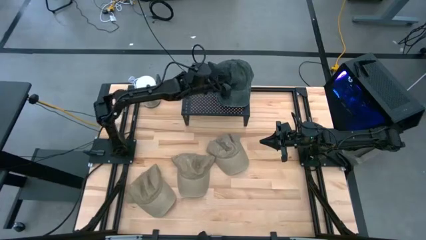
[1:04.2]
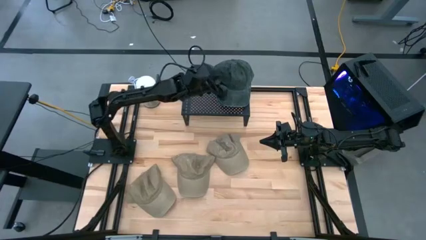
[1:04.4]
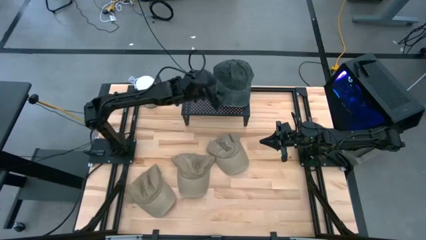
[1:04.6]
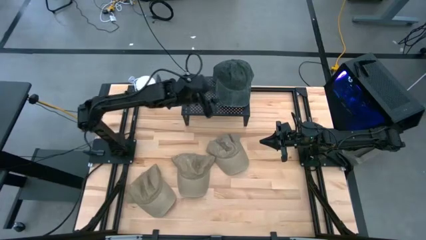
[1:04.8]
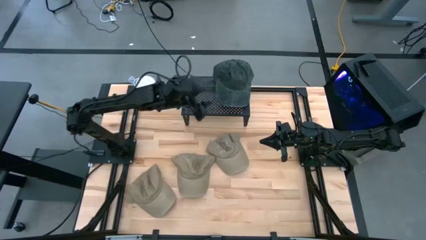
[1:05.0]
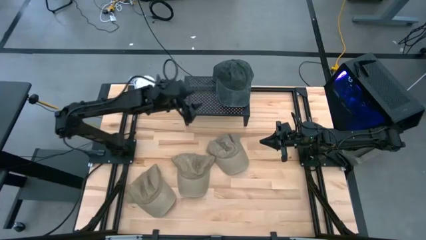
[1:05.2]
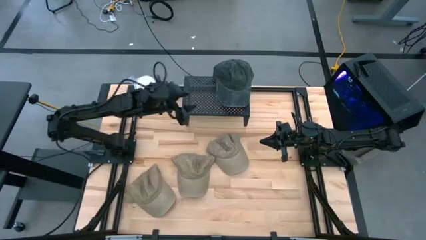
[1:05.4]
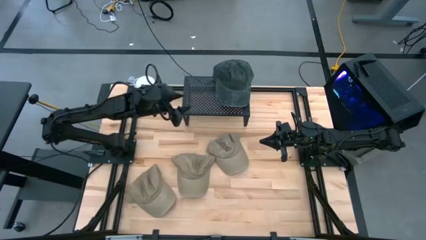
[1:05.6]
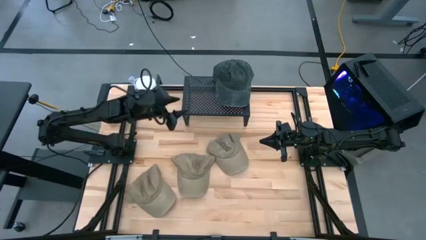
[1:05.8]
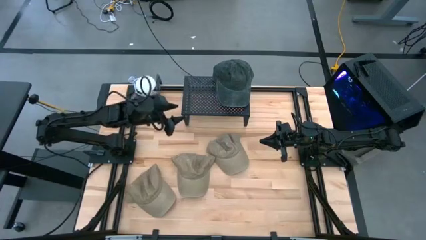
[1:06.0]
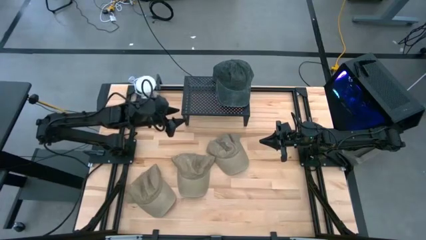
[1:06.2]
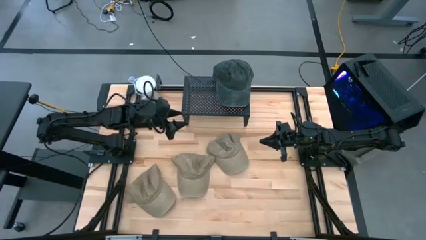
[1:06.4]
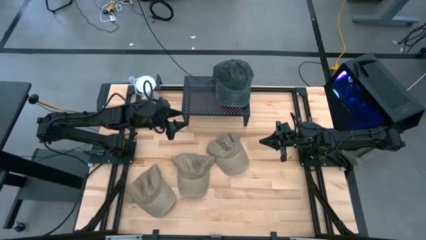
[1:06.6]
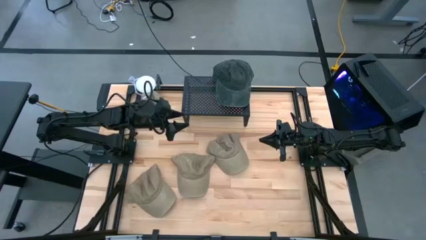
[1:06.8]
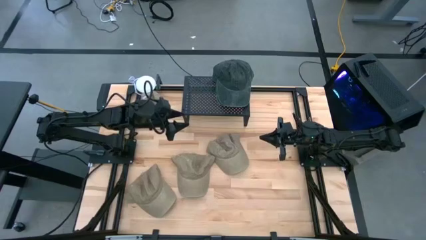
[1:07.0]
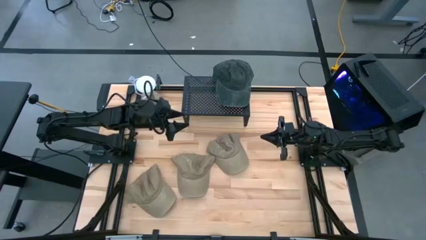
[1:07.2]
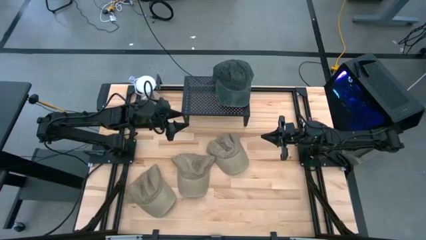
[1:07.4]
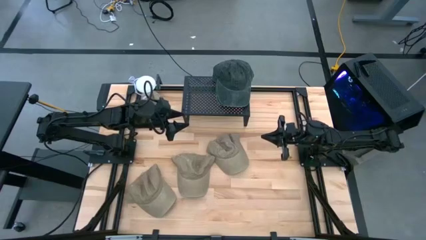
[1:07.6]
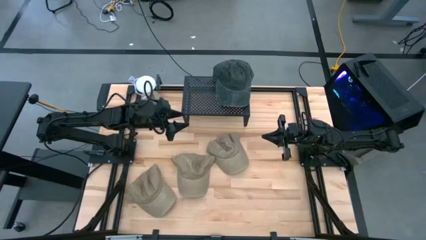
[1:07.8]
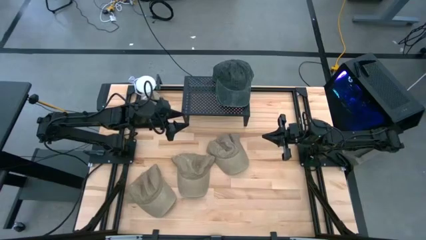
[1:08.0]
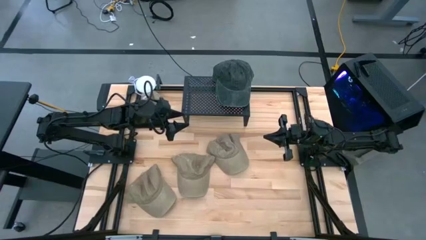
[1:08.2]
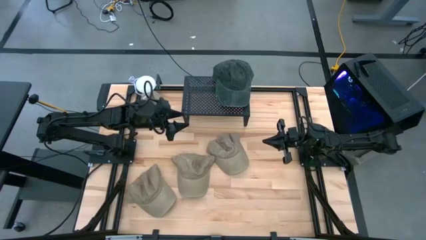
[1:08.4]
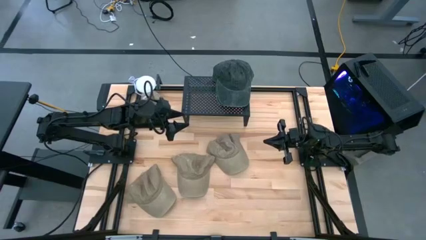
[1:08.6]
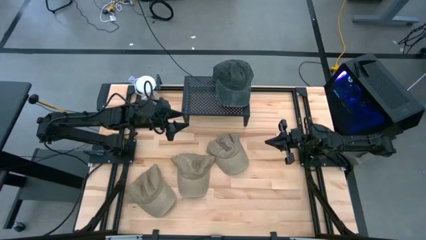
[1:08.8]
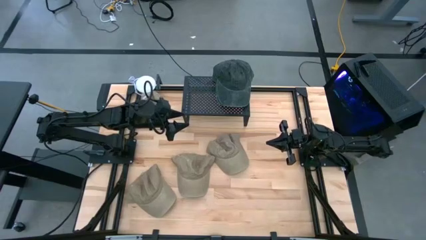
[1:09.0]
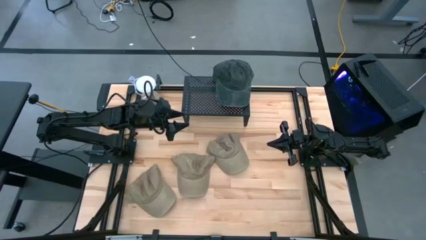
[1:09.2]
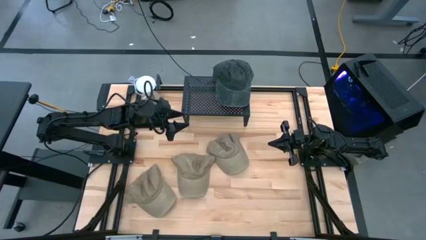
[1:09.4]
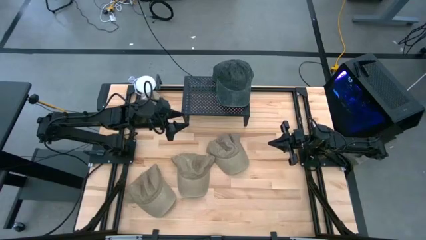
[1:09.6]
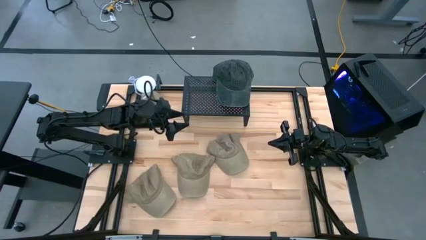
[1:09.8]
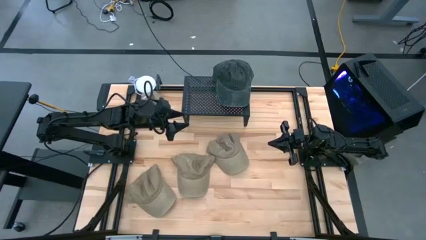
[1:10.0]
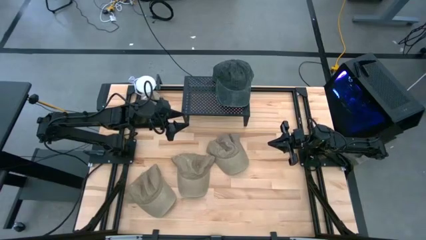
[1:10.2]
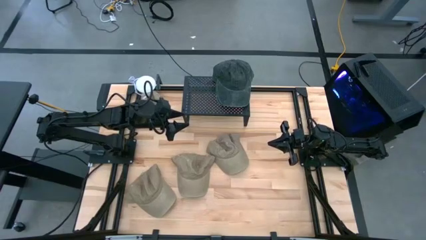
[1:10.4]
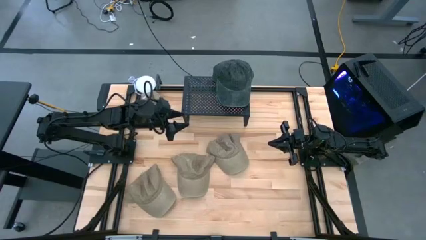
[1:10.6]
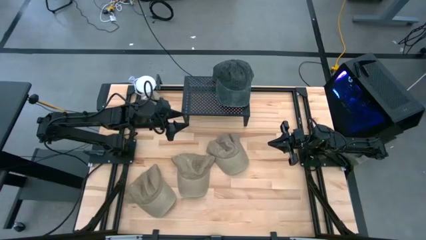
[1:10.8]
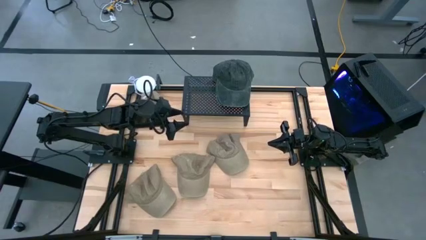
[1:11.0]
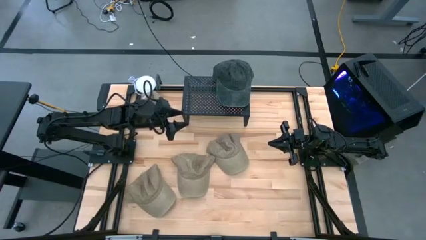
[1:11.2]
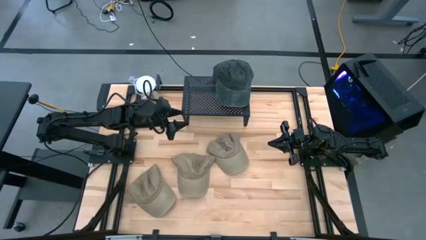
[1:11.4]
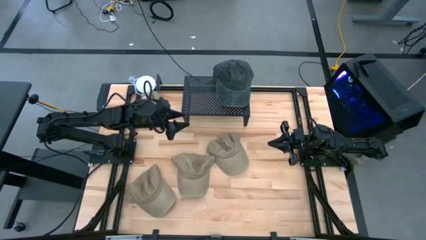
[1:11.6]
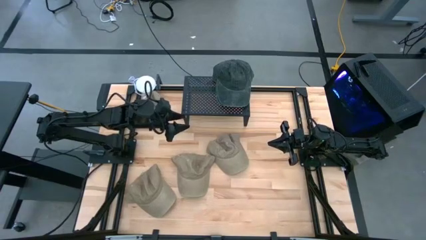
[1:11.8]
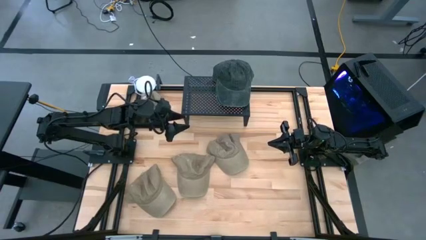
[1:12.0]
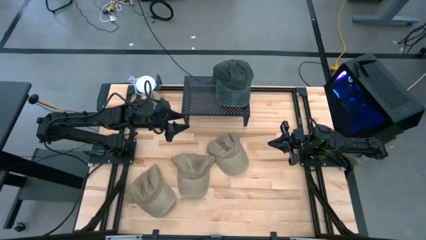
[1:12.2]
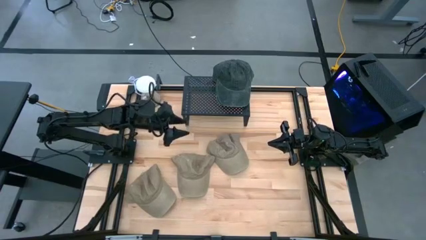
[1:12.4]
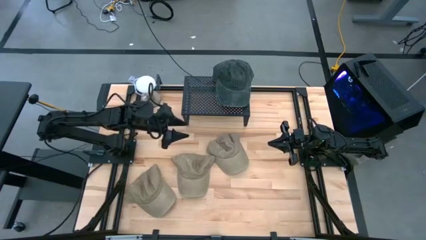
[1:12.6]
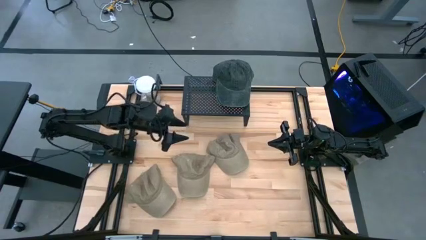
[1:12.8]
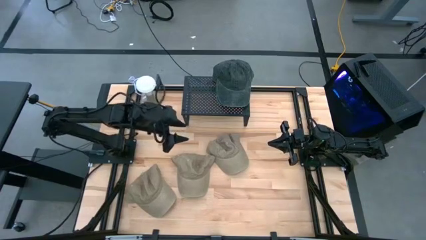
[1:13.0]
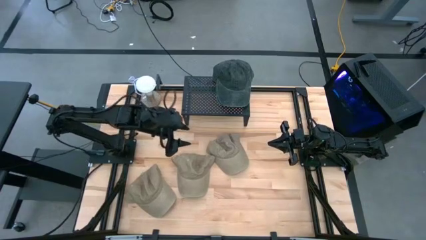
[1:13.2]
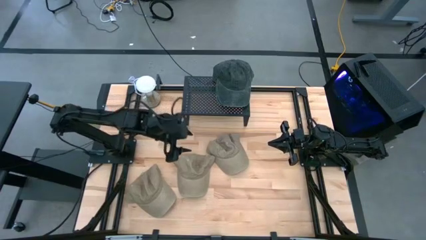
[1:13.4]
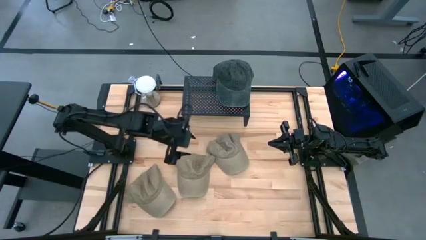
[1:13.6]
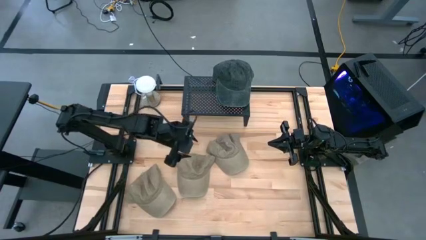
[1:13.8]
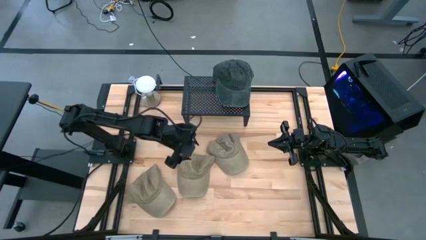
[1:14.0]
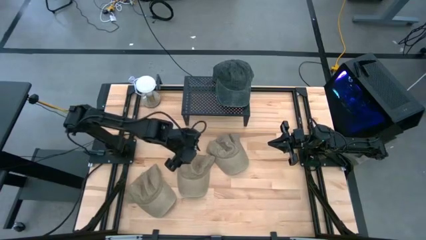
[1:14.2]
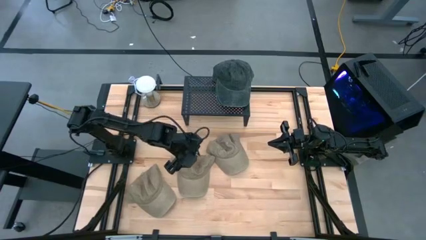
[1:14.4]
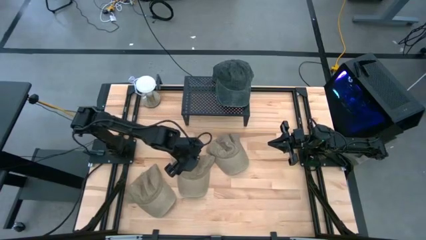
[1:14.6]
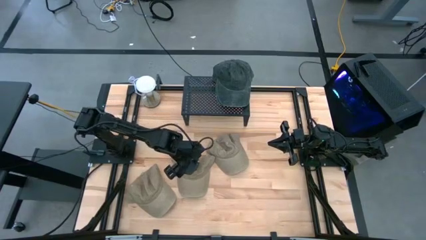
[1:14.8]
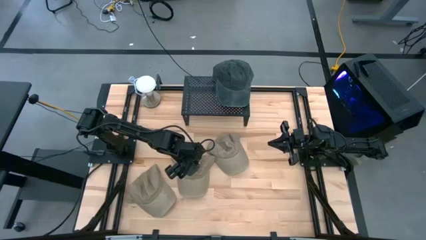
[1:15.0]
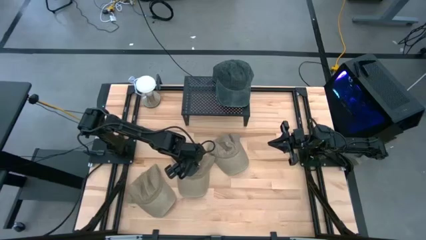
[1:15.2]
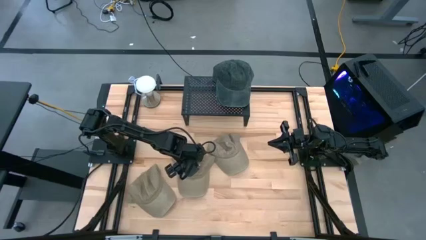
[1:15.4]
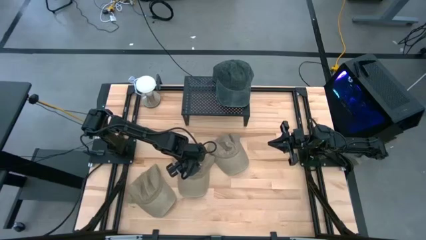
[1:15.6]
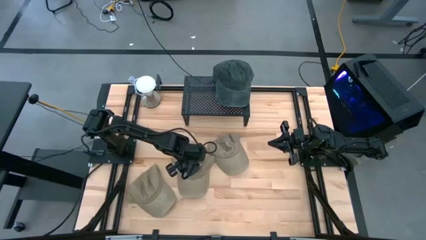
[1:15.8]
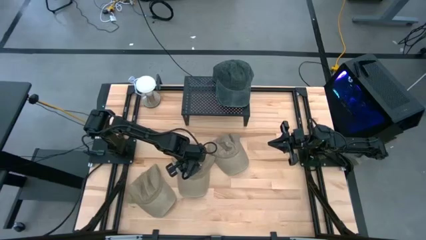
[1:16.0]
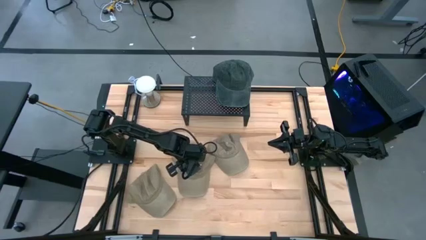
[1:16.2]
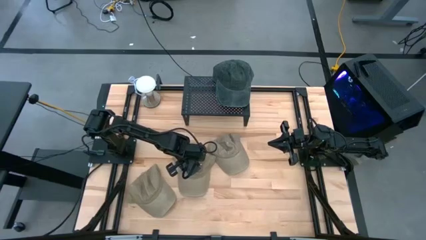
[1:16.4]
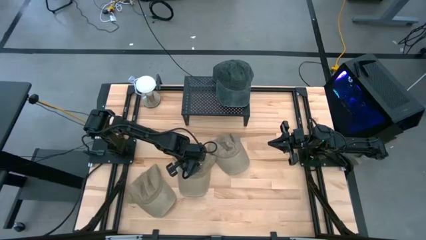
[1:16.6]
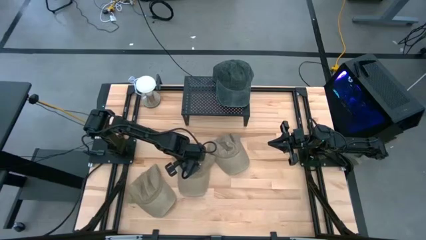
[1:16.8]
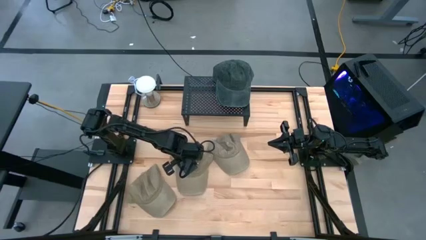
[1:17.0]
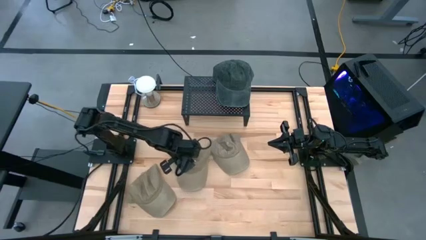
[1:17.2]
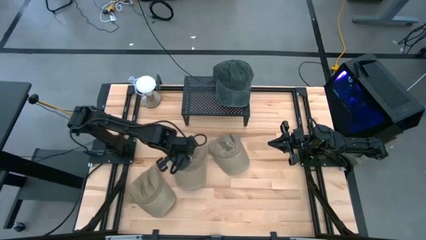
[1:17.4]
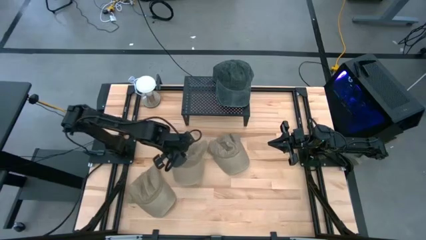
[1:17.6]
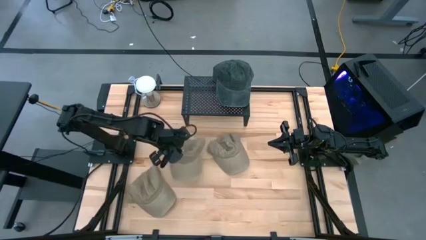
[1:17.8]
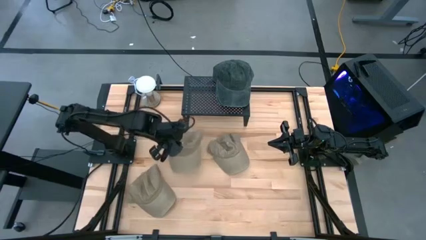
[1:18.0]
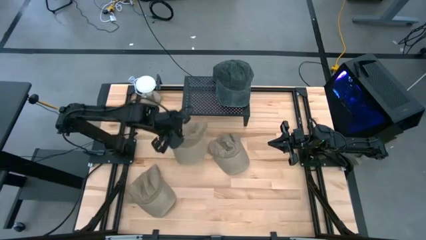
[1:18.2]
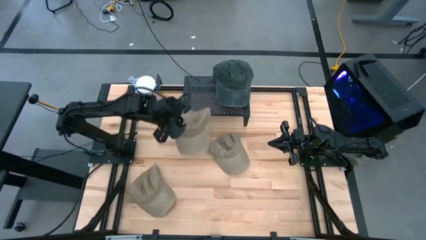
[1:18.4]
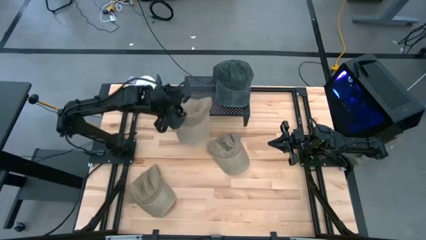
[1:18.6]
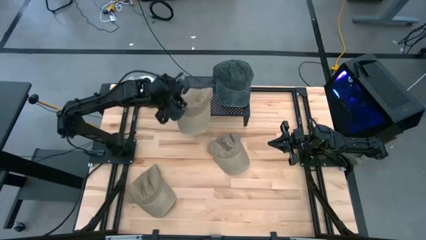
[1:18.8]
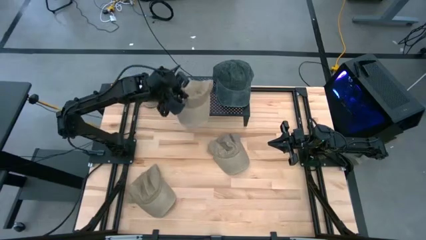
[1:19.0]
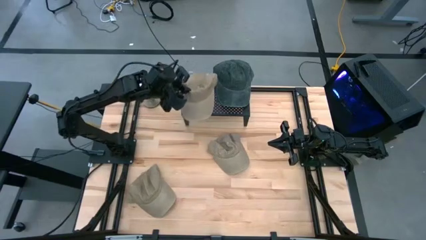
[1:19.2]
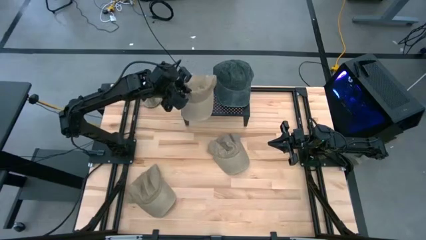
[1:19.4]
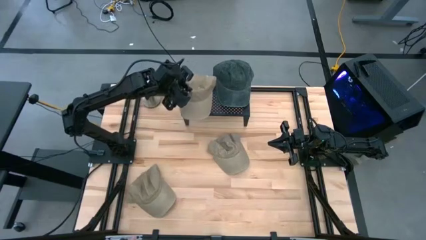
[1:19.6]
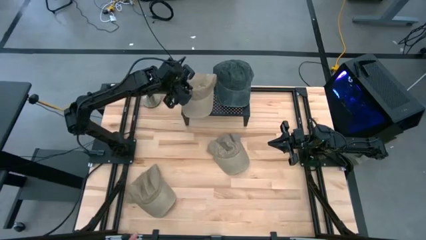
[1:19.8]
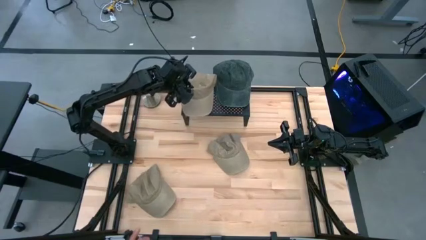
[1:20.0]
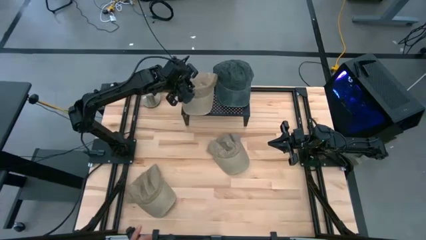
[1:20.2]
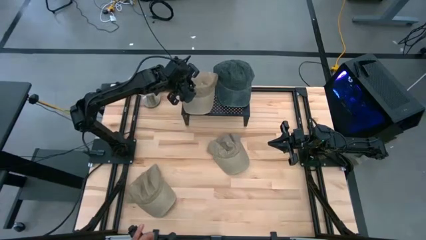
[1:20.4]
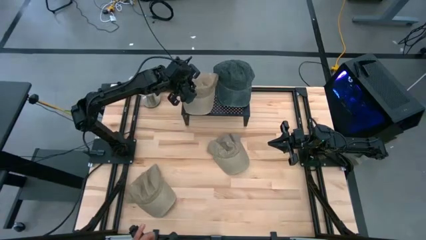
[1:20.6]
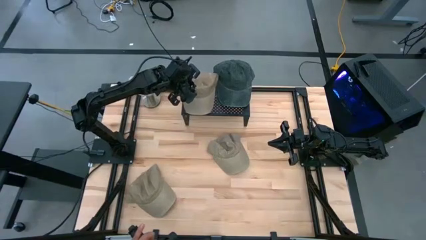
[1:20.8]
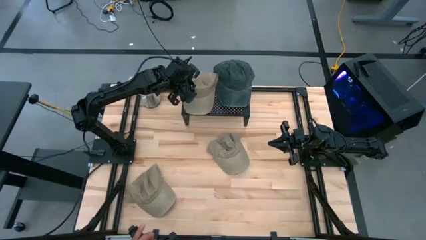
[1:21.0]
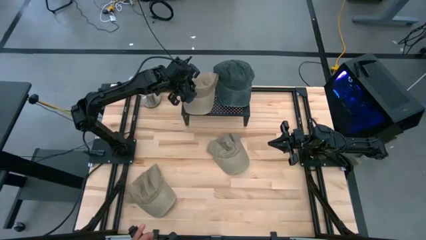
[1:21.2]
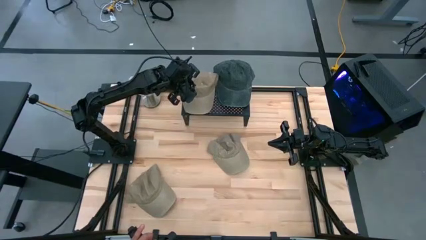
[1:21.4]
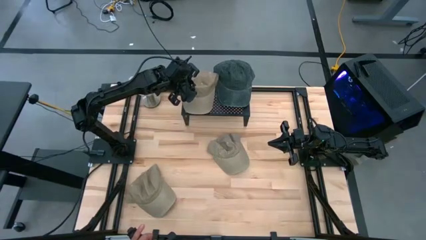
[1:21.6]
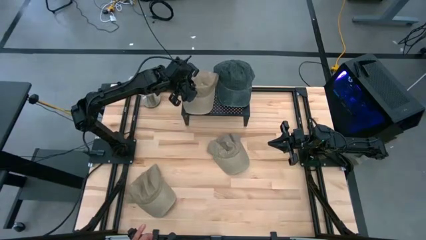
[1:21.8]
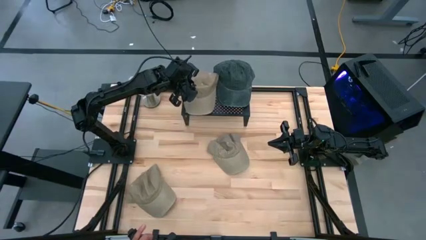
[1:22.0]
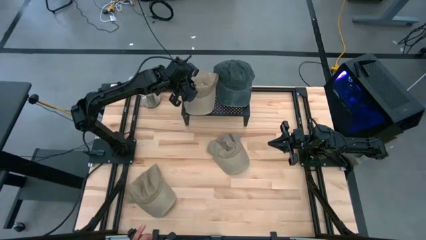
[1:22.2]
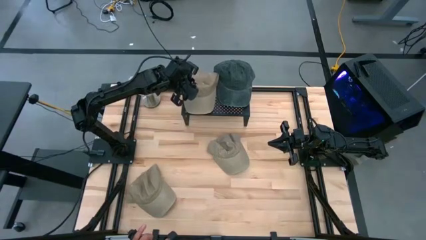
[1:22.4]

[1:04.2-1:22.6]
Task: Pick & Place hat
Put the middle brown cap on the shelf
